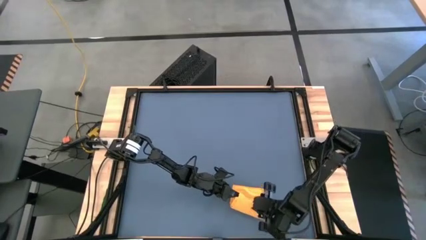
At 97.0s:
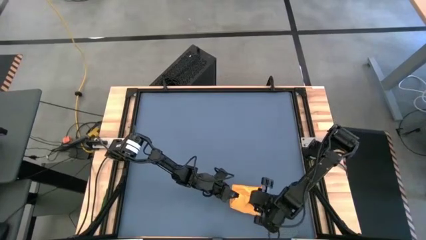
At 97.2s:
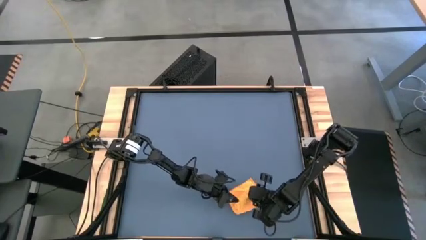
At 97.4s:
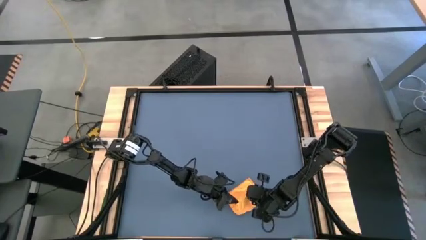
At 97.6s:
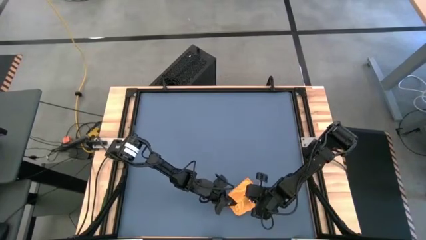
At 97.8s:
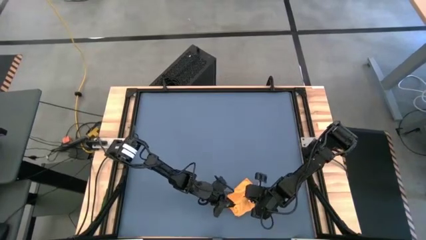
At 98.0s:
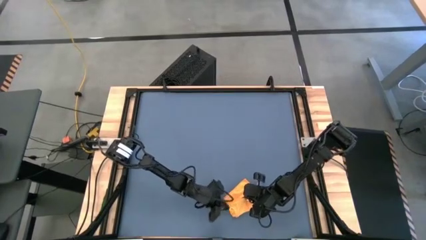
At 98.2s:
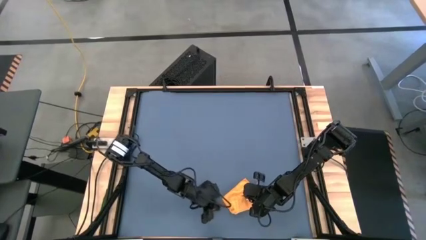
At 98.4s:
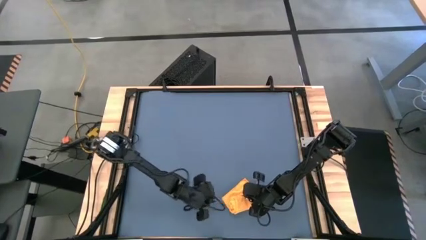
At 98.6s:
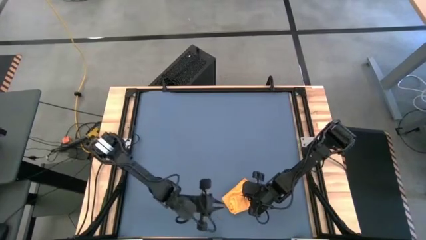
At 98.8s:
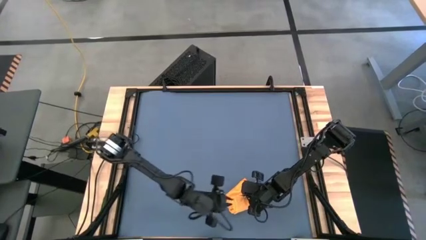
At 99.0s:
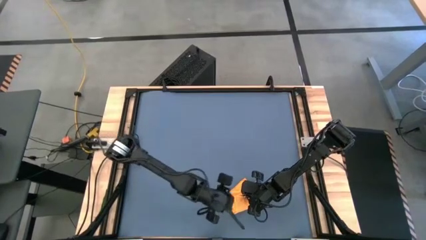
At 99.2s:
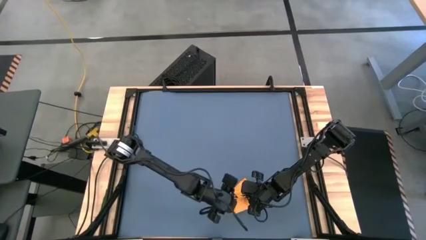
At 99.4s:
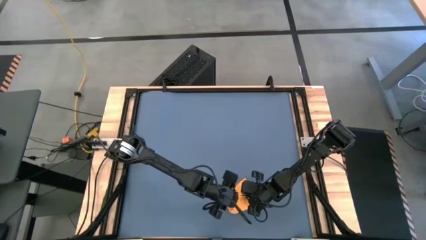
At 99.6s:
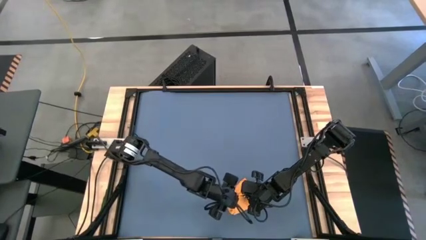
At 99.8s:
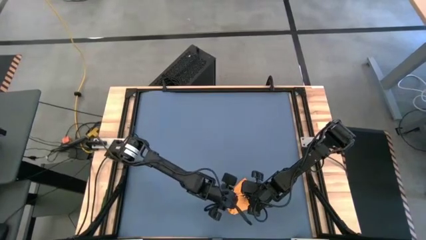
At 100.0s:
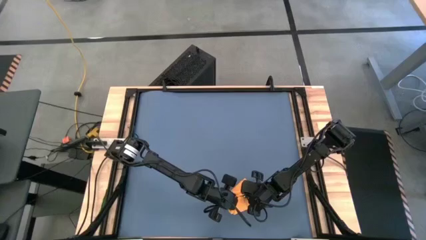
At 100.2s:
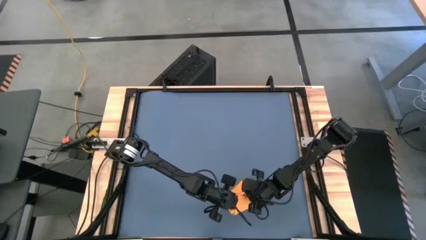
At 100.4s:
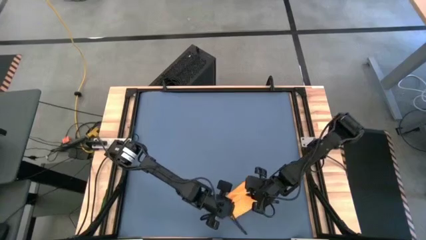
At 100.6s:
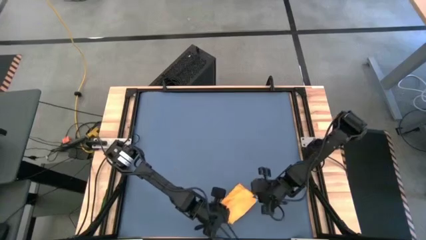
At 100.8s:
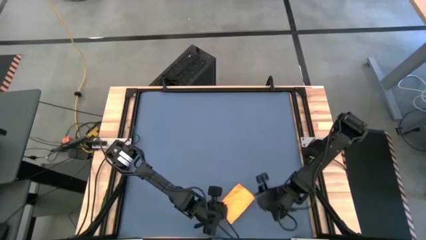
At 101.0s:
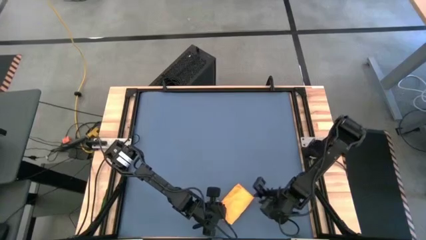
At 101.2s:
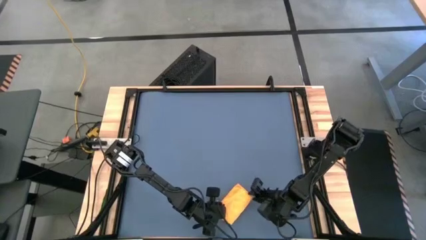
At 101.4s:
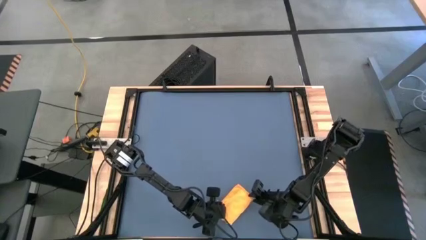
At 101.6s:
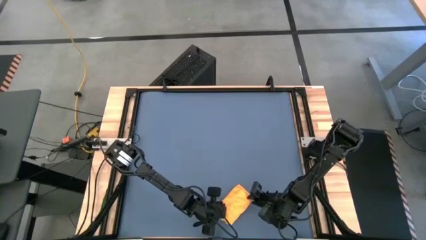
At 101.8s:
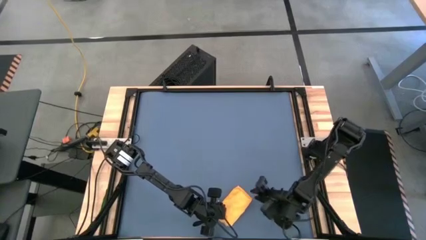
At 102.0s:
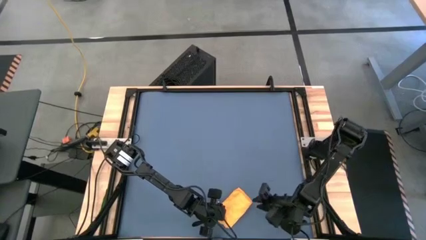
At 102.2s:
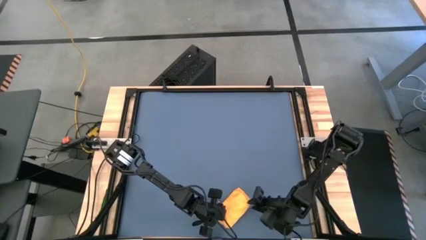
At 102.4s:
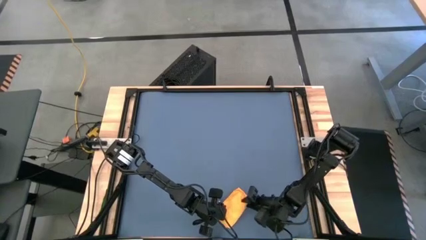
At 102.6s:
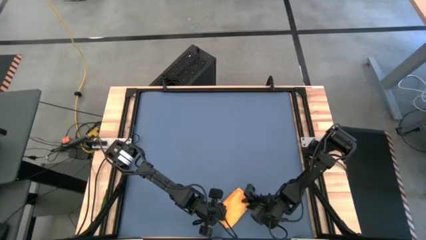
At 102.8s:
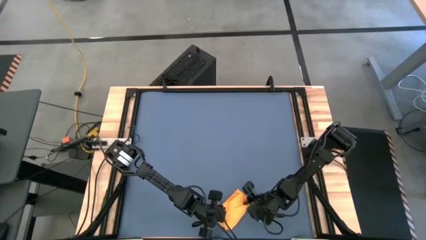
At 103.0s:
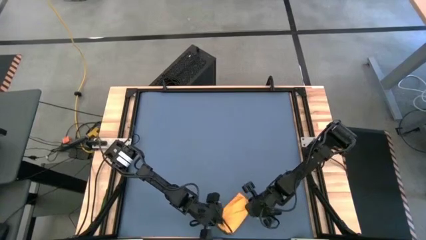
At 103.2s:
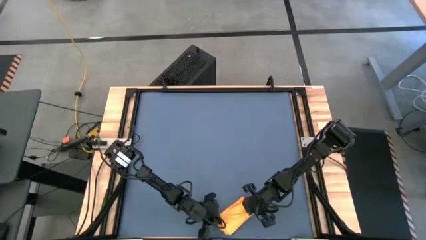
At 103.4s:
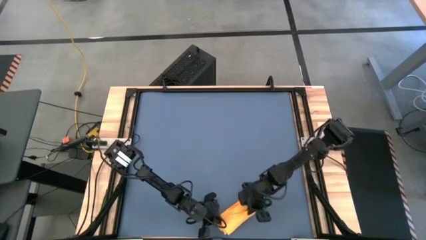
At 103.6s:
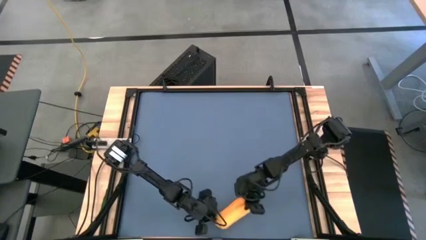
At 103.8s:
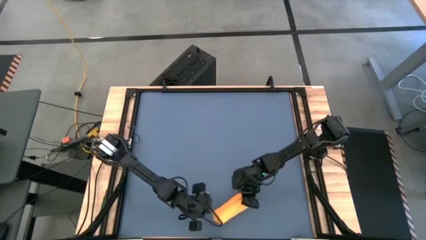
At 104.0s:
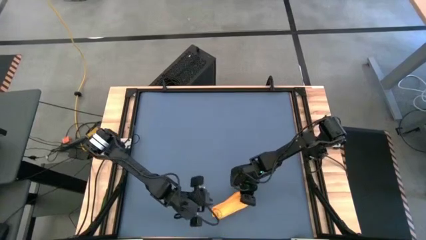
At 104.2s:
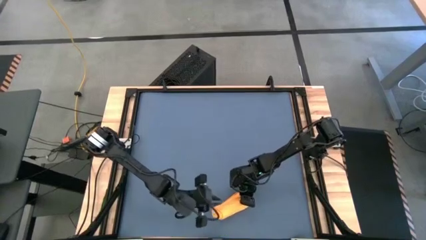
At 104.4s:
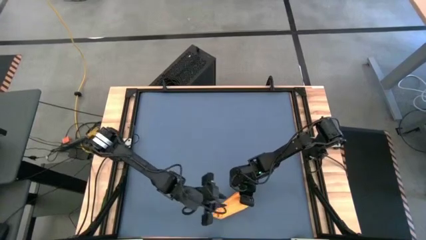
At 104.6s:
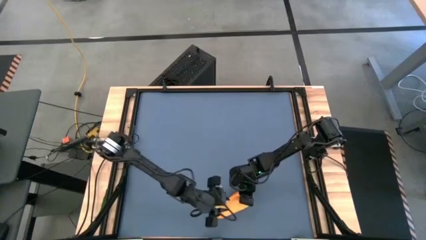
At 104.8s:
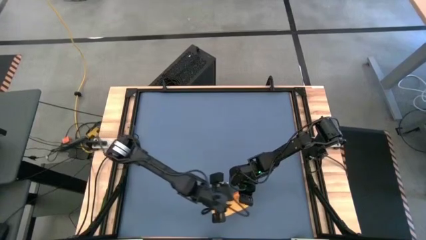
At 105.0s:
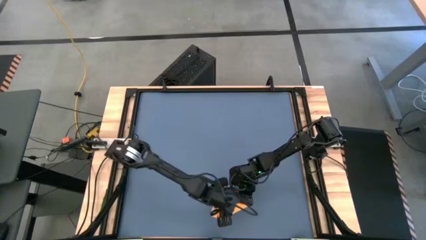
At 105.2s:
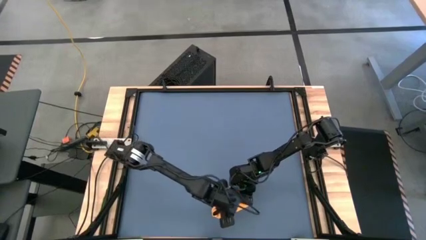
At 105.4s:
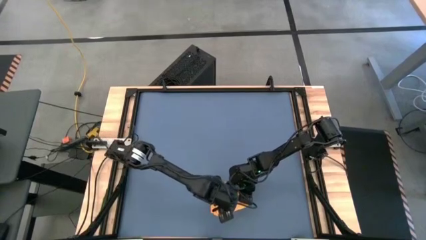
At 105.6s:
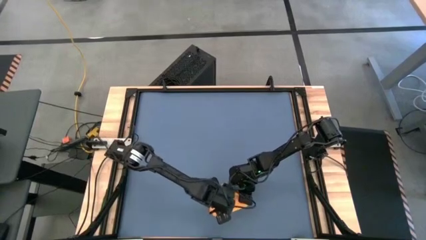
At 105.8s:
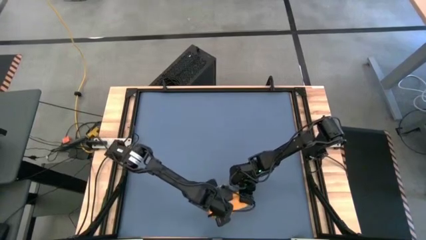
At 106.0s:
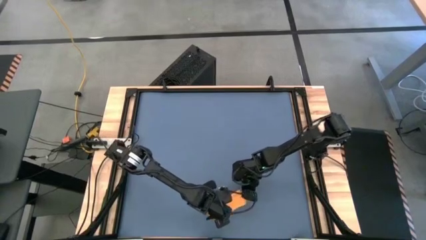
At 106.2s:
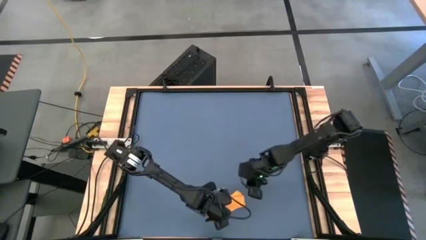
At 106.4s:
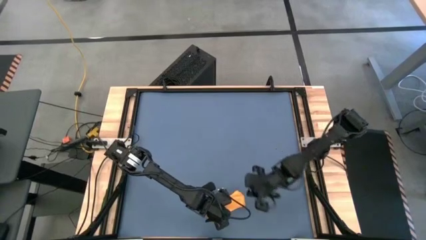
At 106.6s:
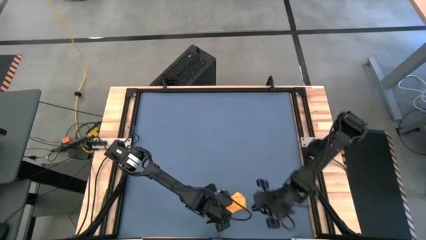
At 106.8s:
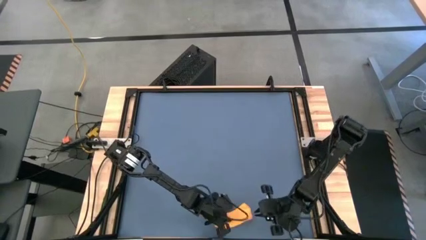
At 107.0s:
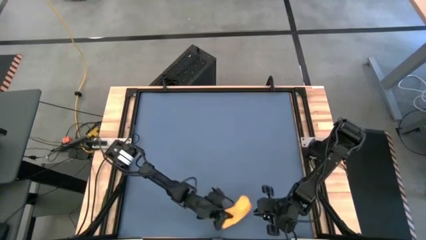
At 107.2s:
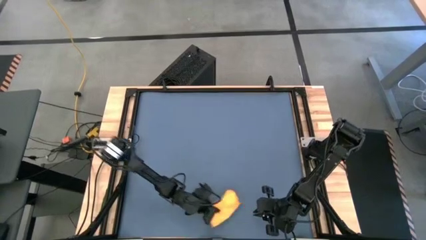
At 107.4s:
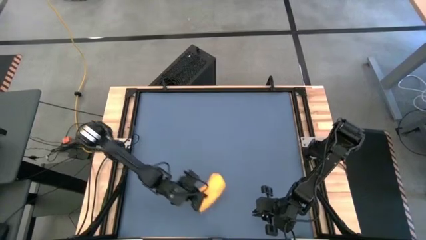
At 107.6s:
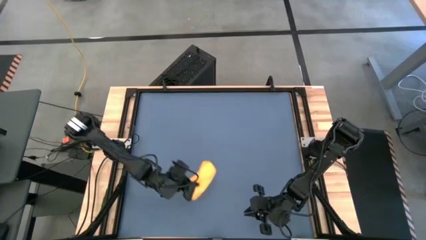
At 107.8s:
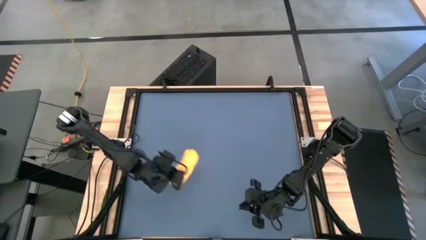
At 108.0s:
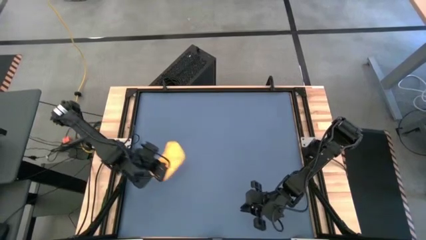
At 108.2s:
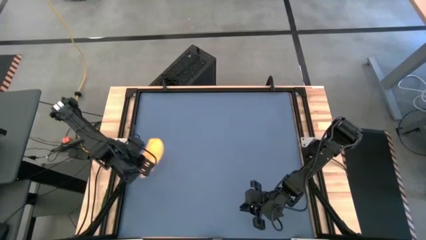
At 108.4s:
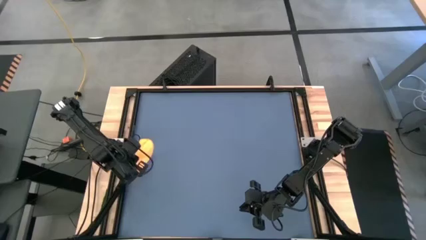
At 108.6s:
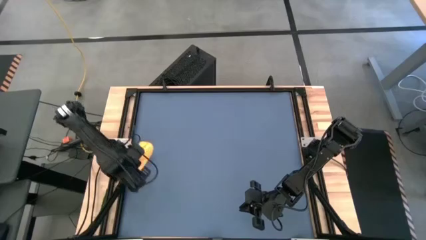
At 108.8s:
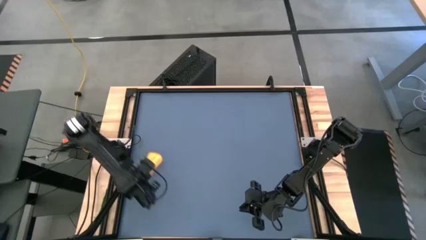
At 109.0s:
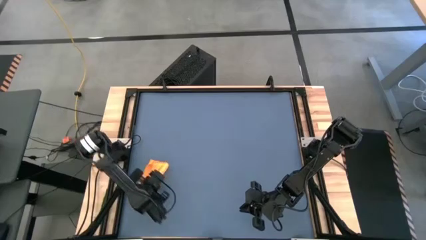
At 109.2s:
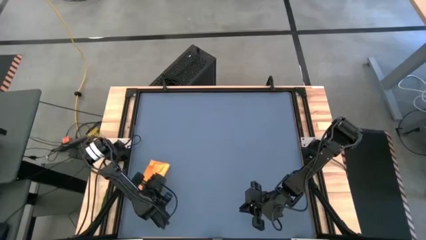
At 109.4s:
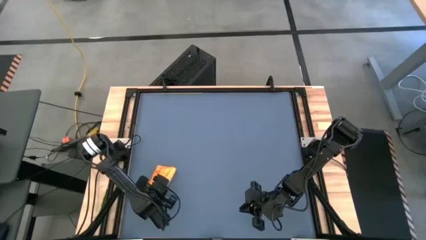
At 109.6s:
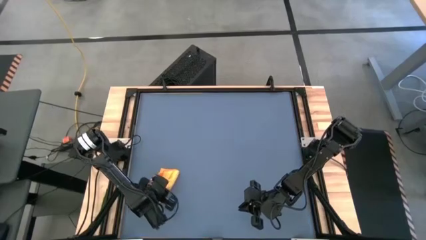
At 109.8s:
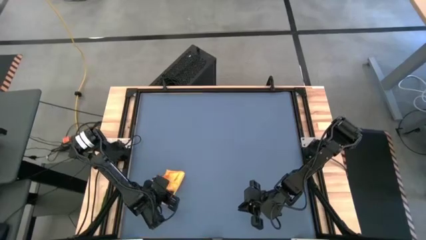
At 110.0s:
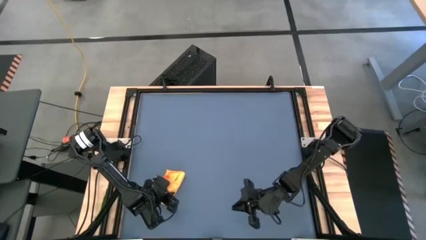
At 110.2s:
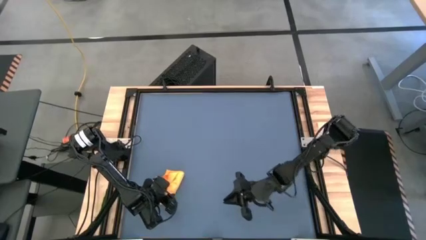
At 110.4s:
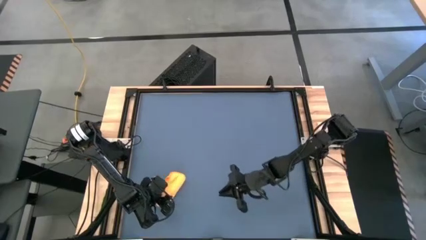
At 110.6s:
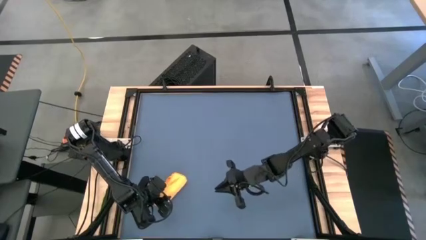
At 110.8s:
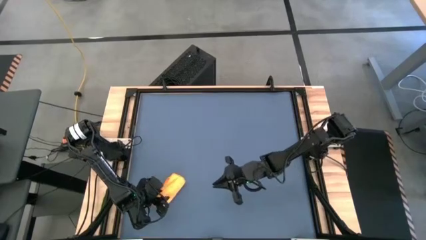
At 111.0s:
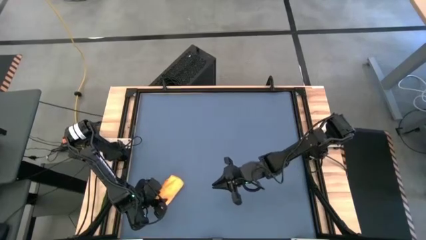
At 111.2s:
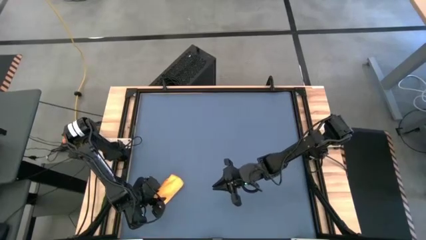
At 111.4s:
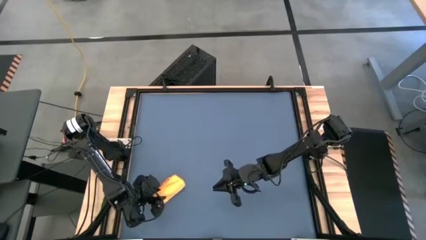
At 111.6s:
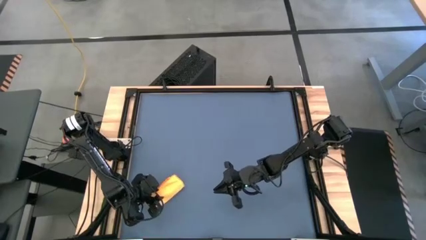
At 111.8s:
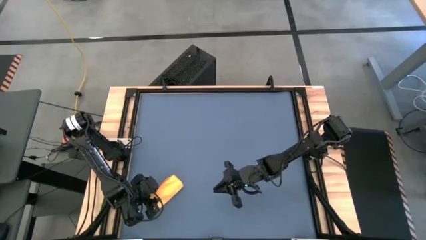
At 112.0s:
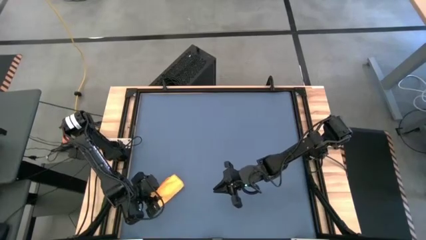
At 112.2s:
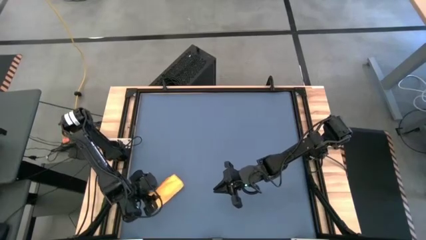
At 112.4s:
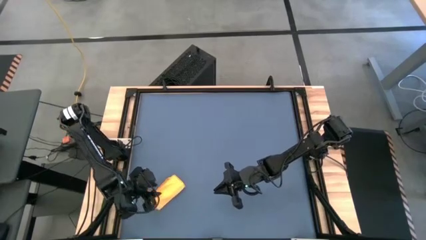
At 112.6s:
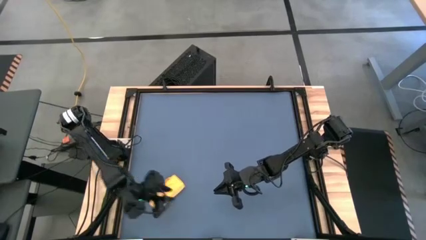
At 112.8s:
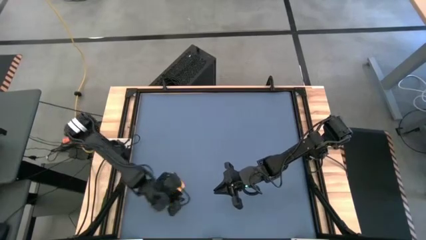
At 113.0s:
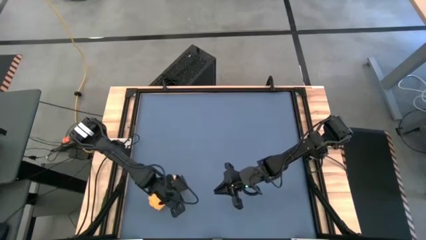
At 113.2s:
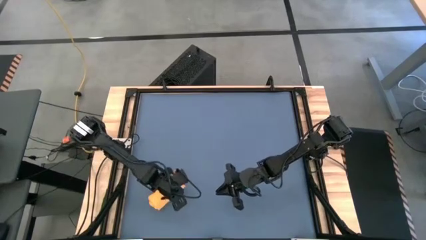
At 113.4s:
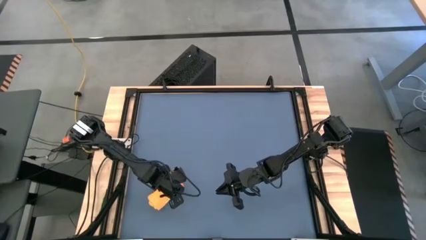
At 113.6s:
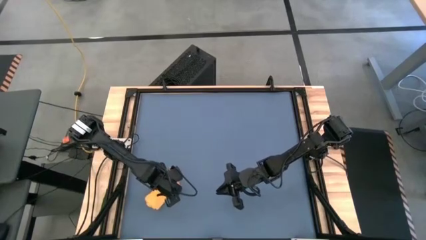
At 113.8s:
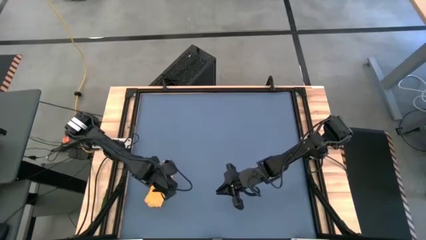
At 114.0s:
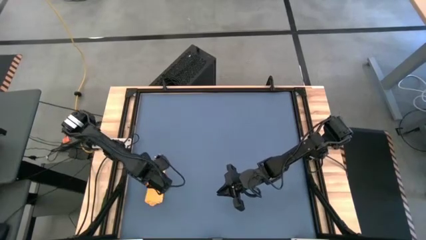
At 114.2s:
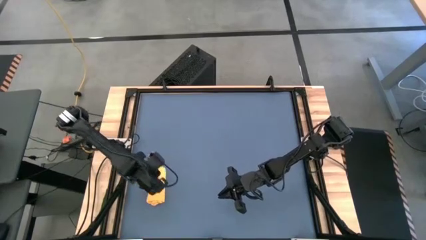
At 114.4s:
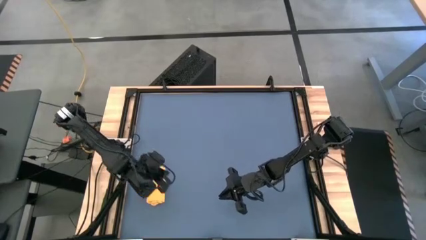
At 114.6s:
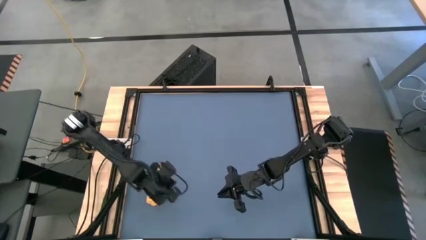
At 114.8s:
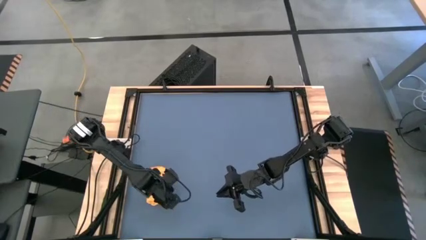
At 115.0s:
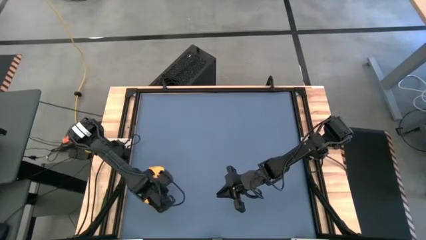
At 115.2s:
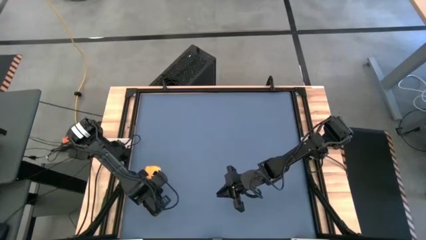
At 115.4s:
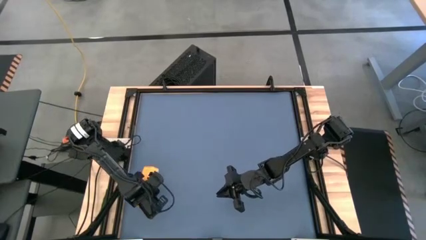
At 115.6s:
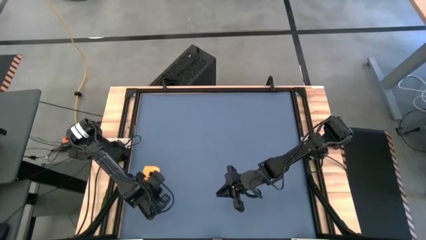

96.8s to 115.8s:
Task: Roll towel
Roll the yellow microfiber towel
